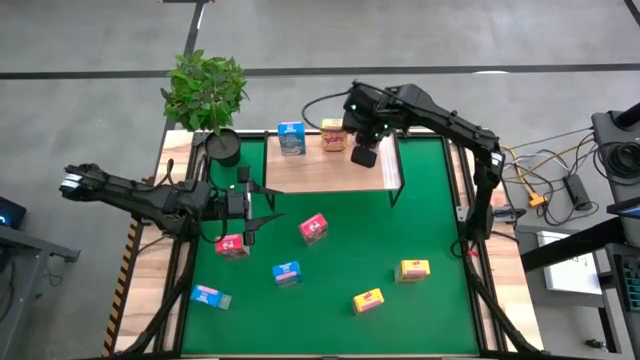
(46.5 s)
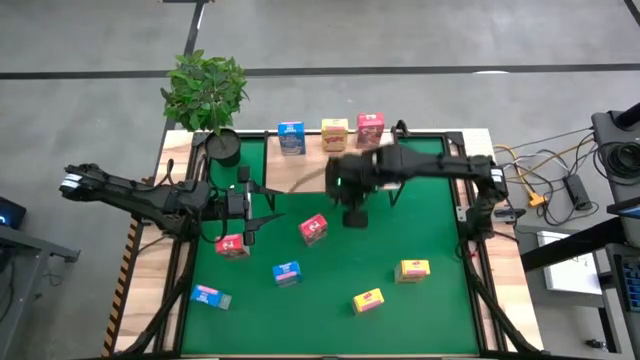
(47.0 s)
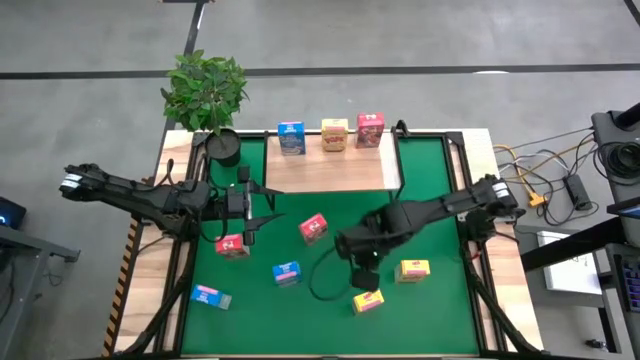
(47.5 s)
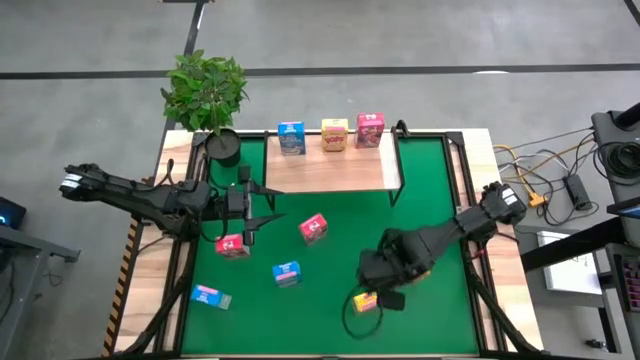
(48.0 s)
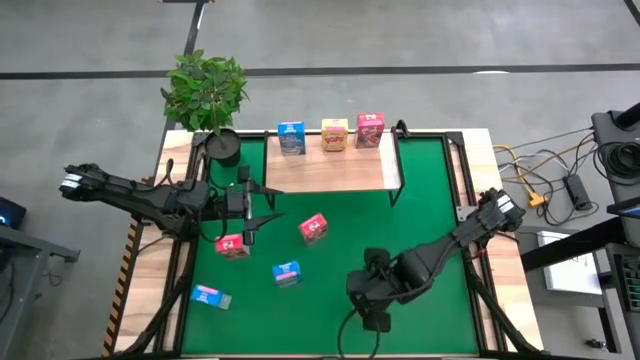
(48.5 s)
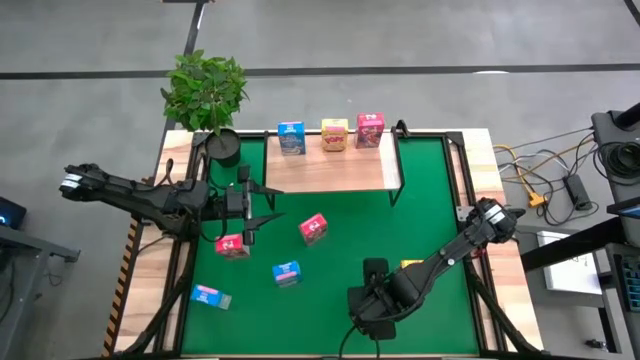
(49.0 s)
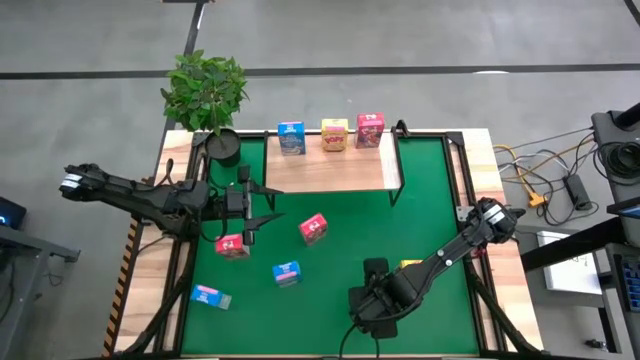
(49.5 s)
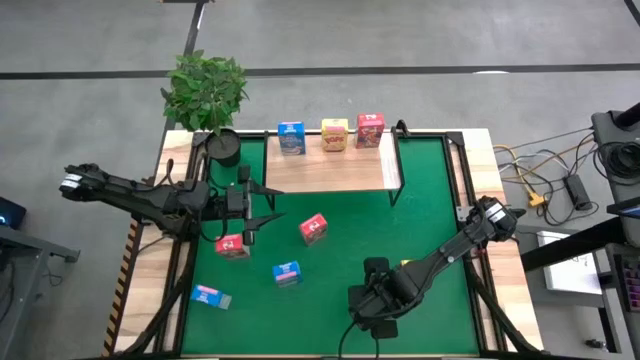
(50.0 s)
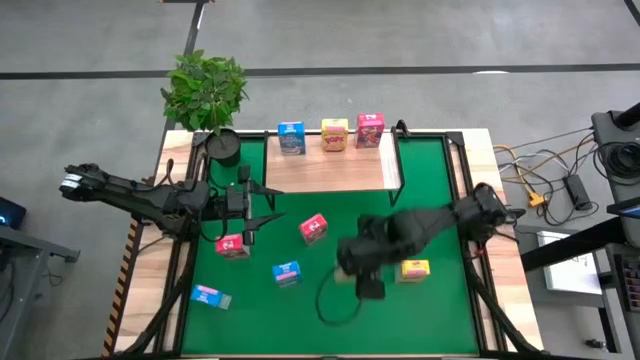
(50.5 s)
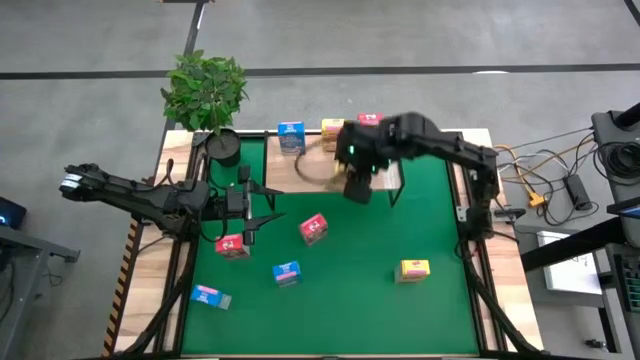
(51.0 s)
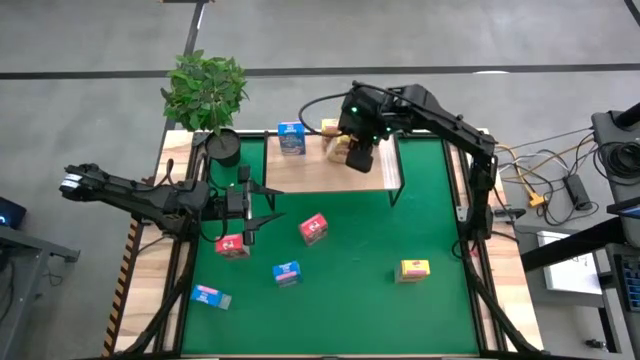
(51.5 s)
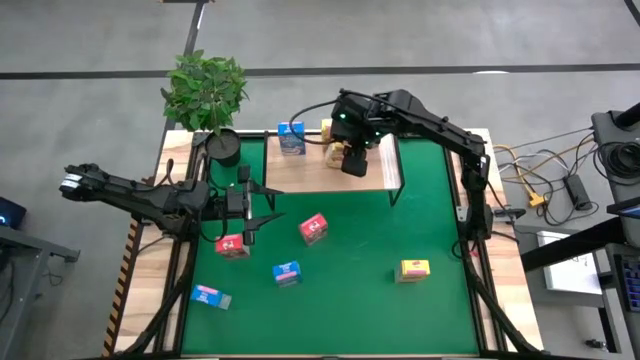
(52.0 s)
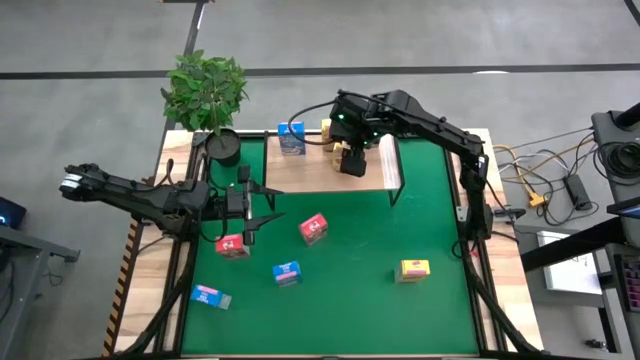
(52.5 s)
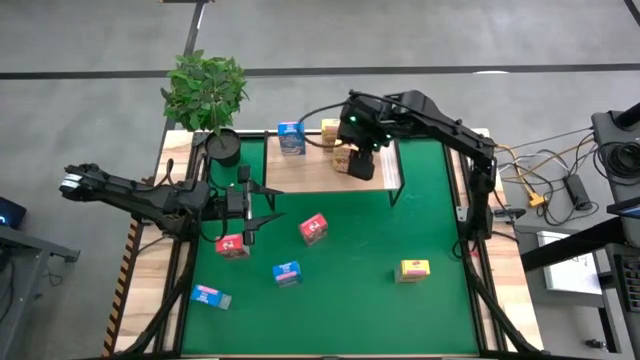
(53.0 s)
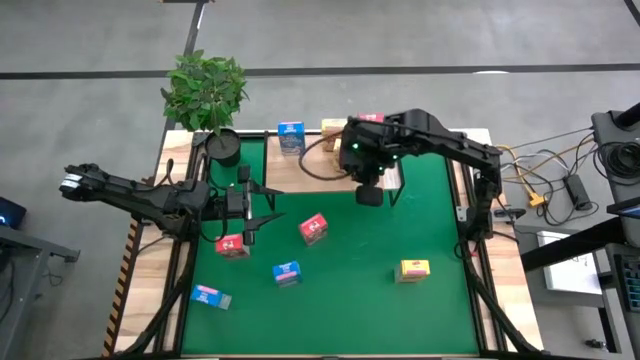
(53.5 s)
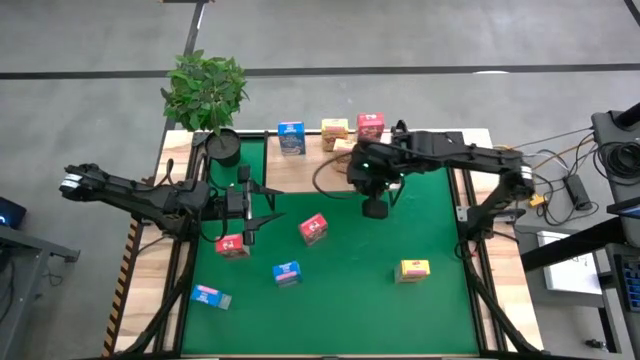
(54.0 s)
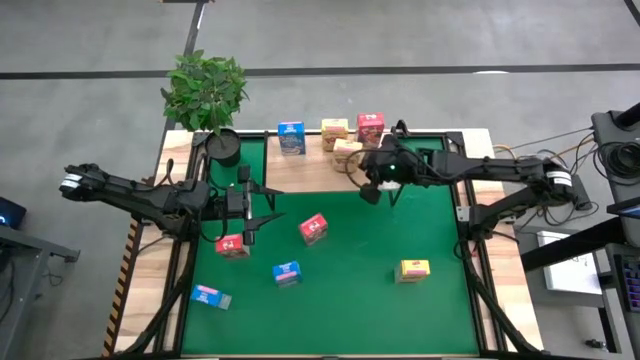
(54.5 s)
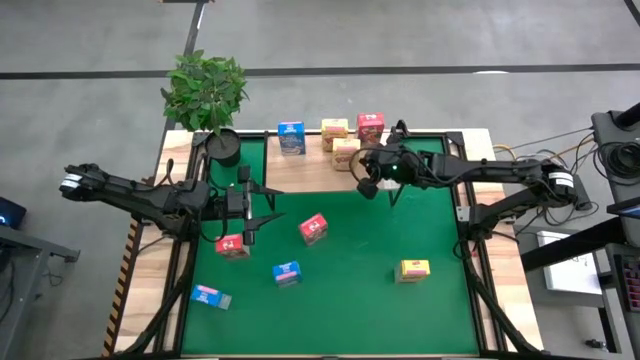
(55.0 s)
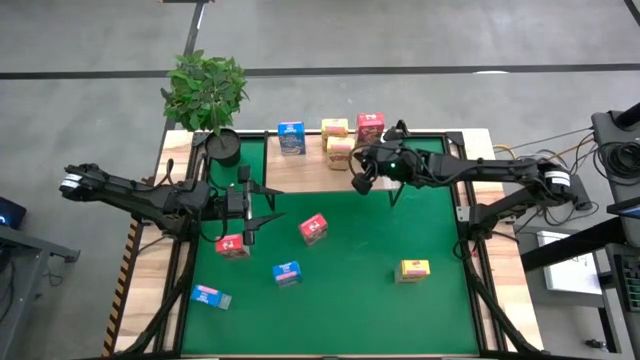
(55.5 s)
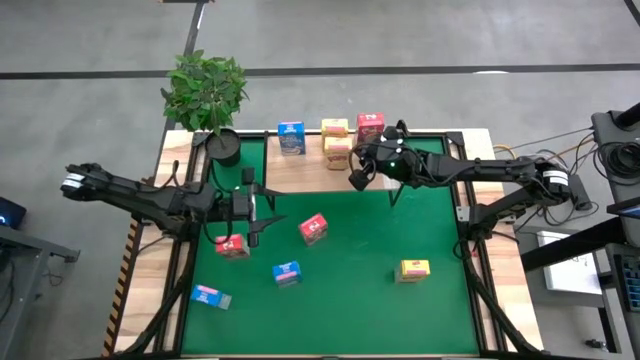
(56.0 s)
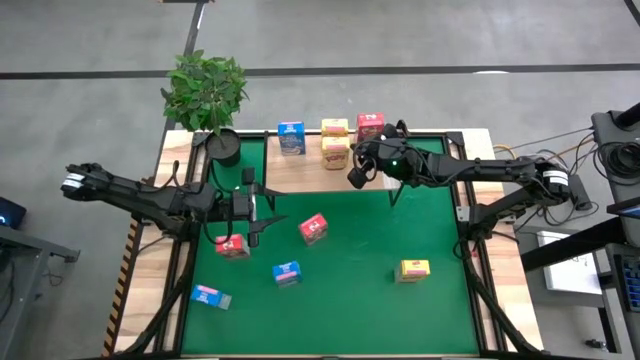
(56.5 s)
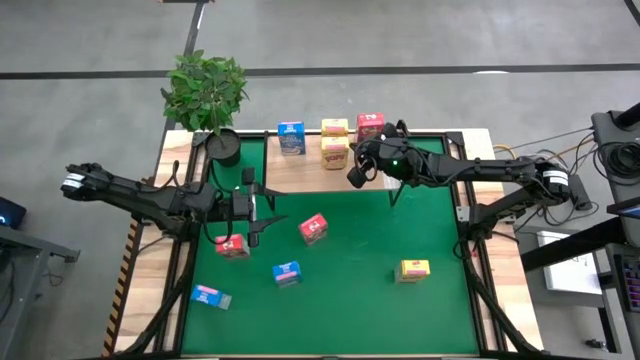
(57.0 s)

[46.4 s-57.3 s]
Task: Stack cereal on shelf
Put the left yellow cereal box on the shelf aligned with the other yellow cereal box

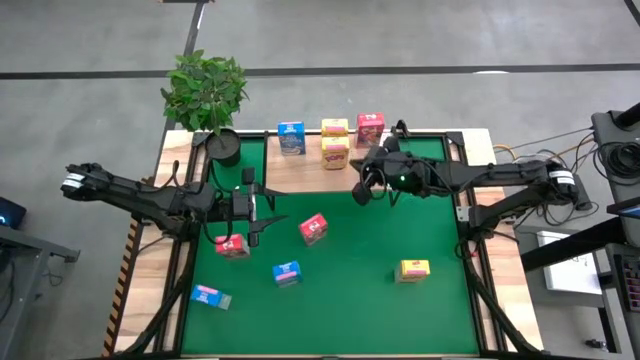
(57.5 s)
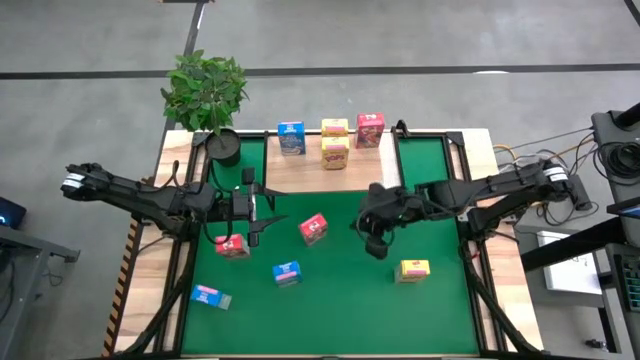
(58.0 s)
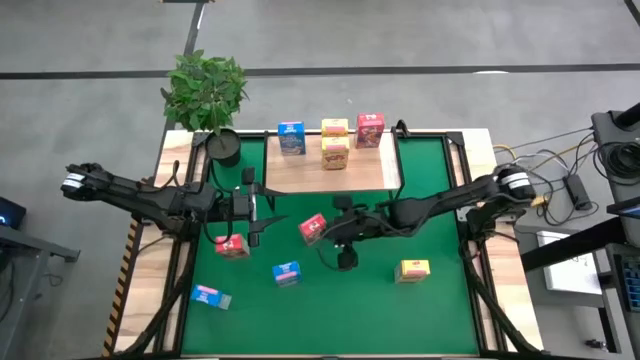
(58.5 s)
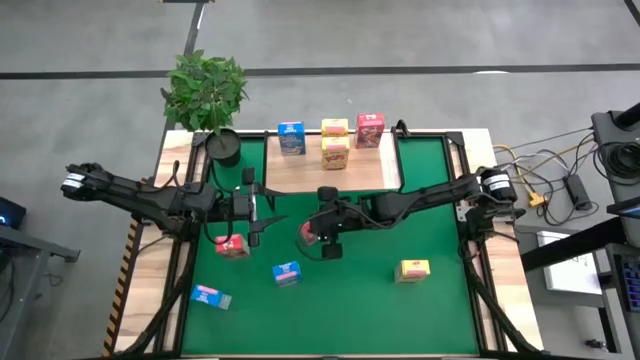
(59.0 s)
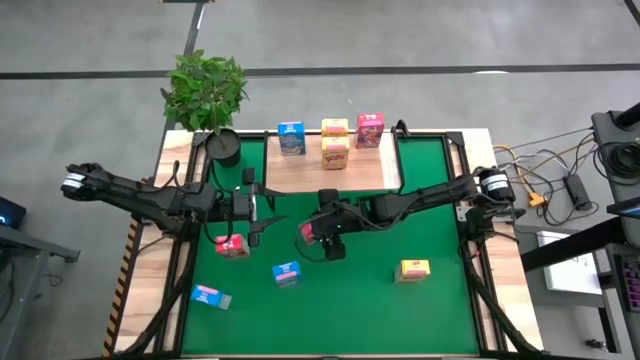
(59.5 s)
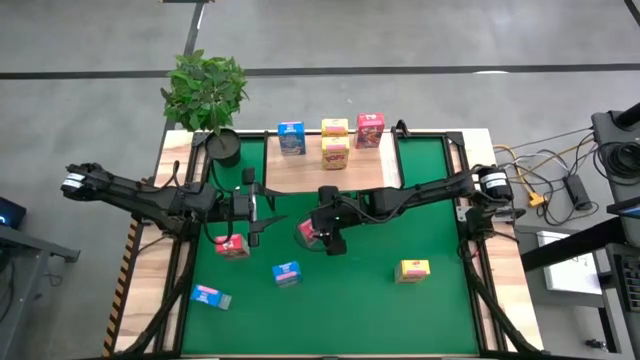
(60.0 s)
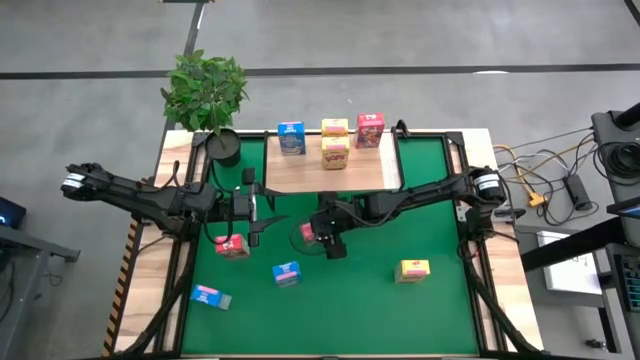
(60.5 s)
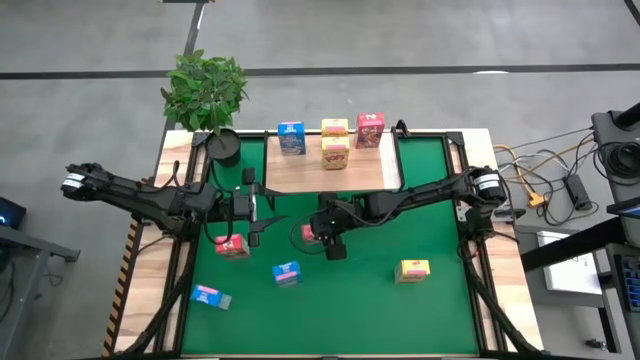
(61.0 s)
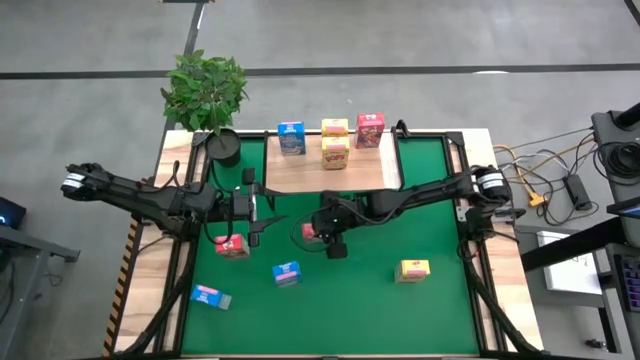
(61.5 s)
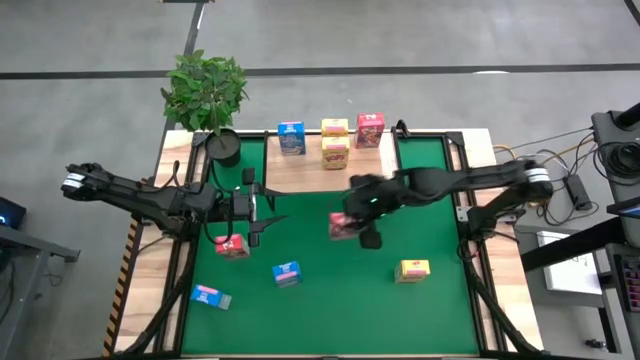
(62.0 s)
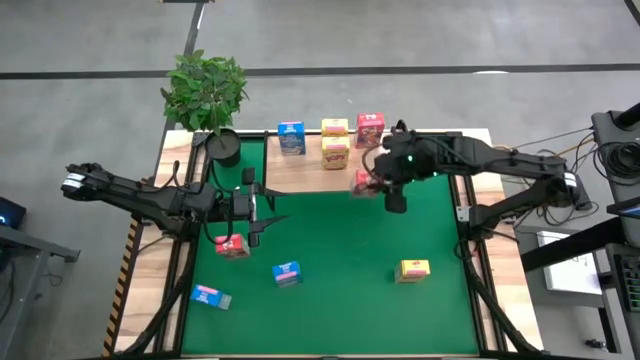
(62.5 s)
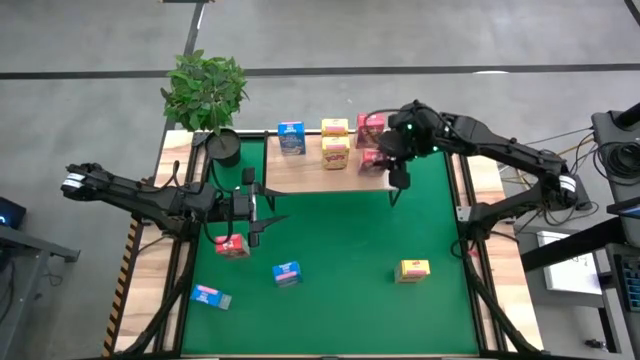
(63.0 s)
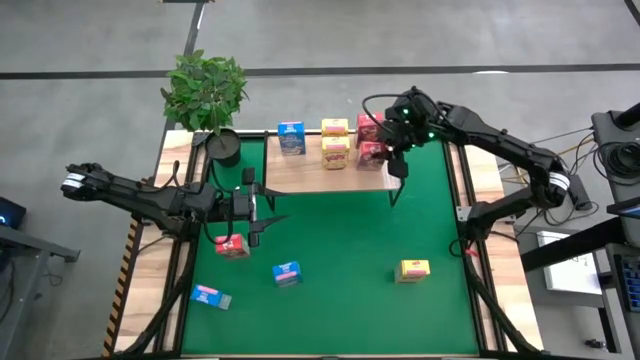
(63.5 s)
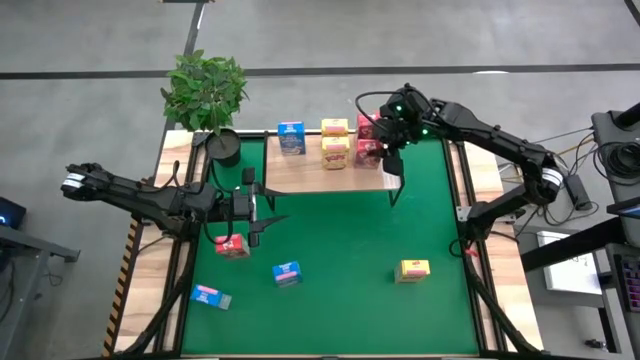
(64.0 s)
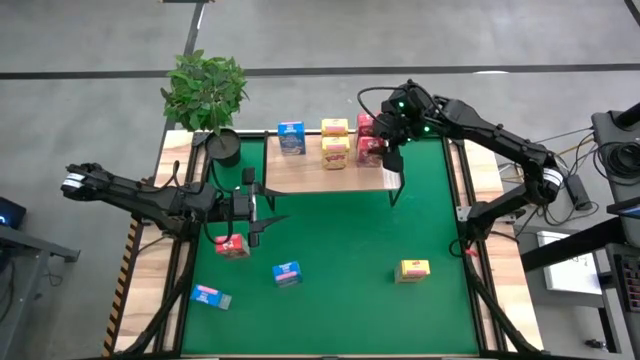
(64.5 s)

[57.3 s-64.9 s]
Put the right red cereal box on the shelf aligned with the other red cereal box

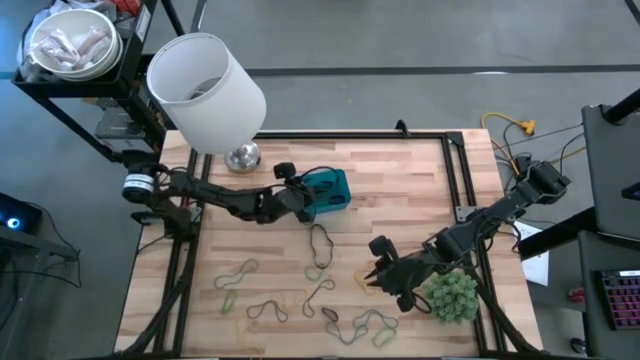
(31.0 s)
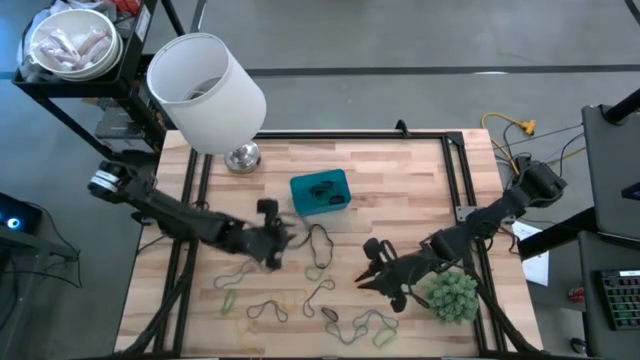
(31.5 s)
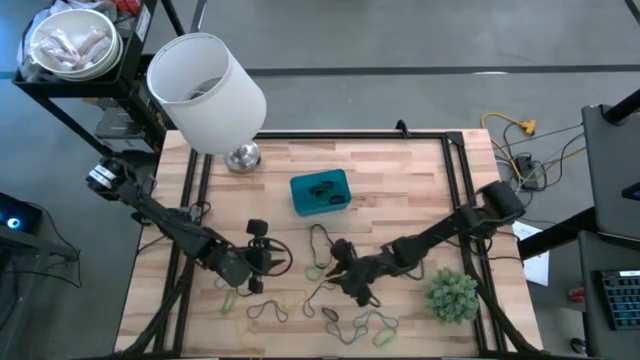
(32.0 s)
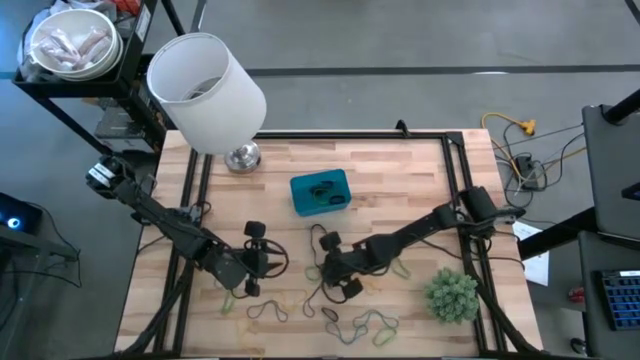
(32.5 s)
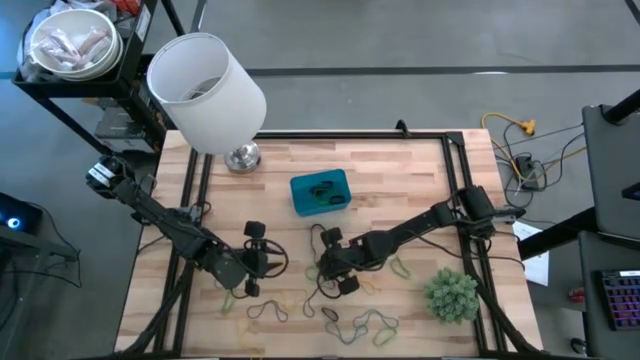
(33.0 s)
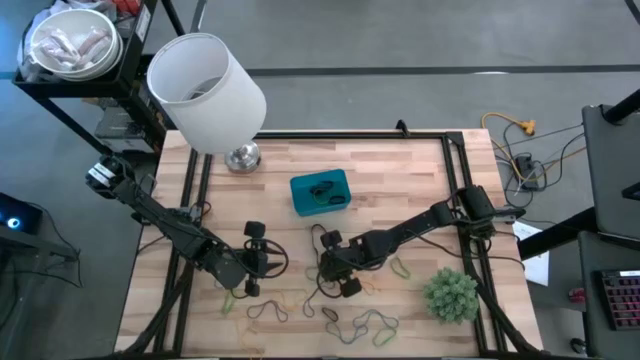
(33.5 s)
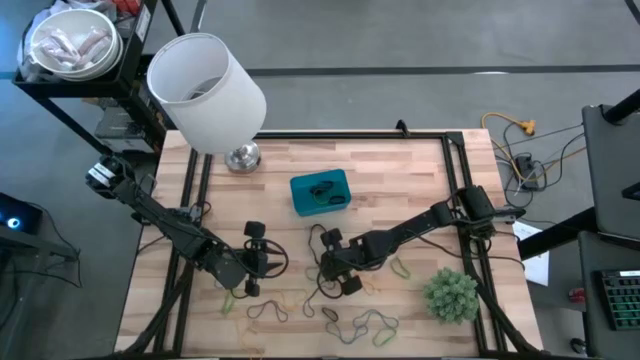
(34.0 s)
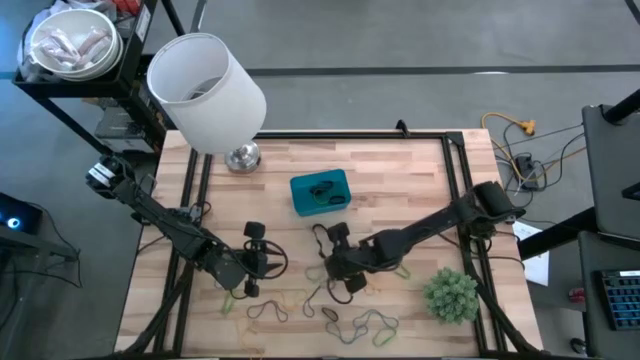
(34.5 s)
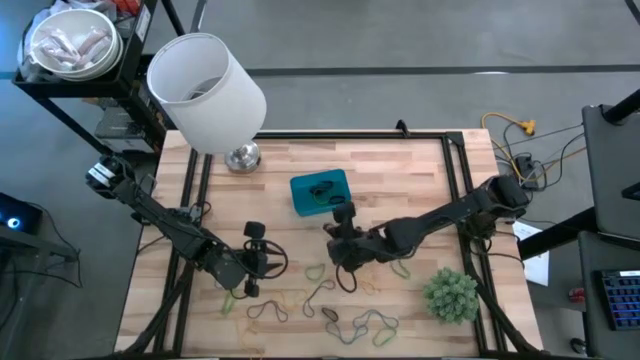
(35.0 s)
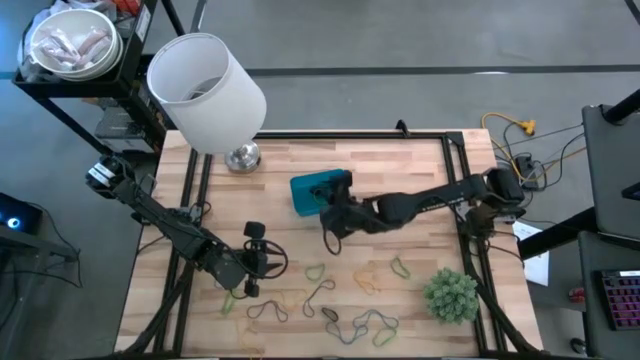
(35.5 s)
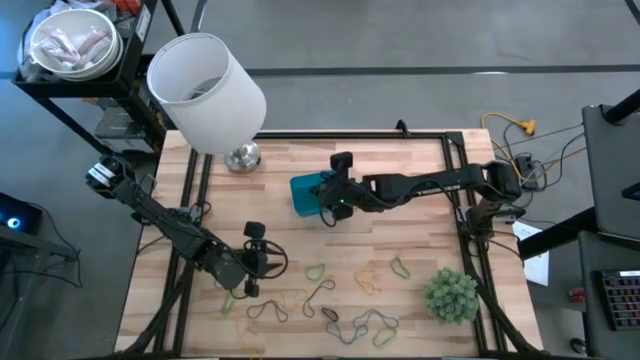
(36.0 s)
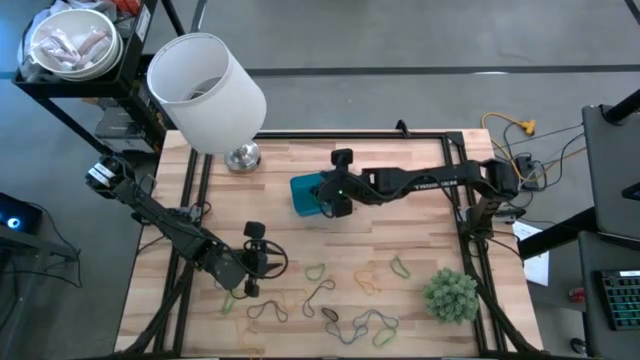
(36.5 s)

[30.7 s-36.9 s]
Task: Pick and place rubber bands into bin
Put the black rubber band into the blue bin
